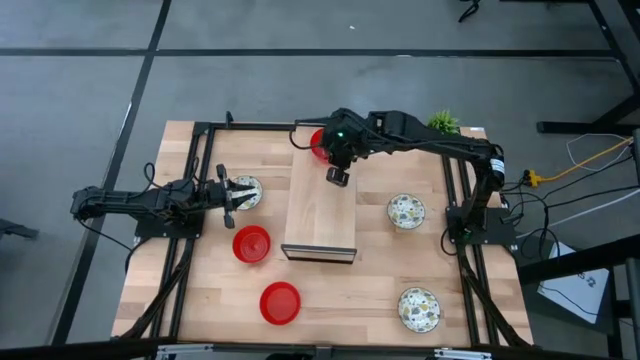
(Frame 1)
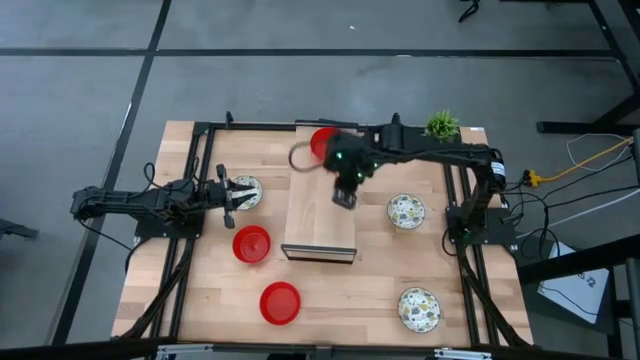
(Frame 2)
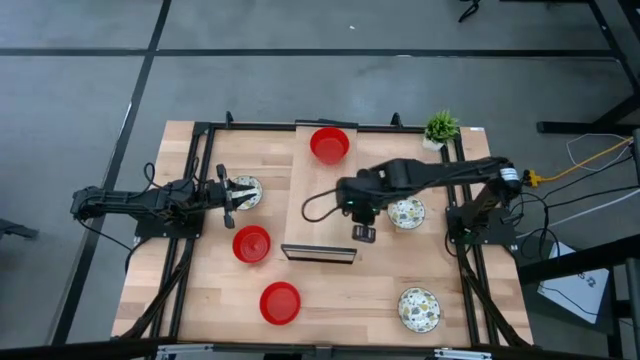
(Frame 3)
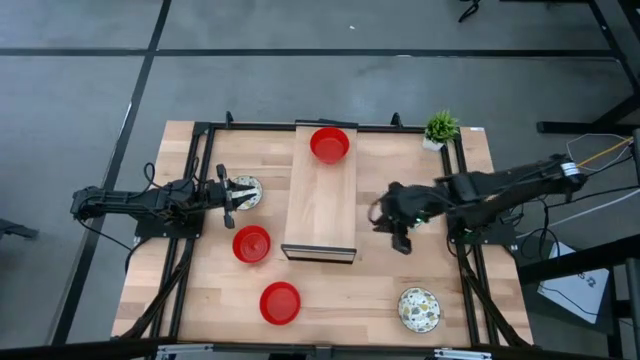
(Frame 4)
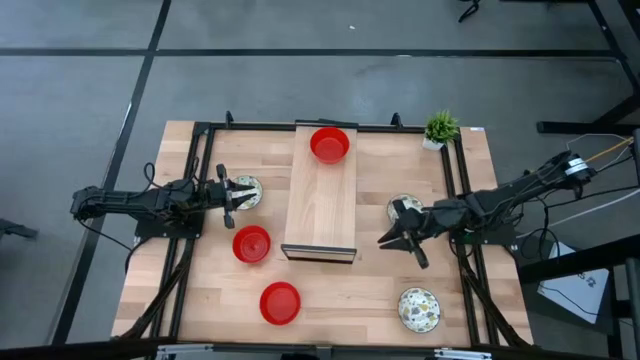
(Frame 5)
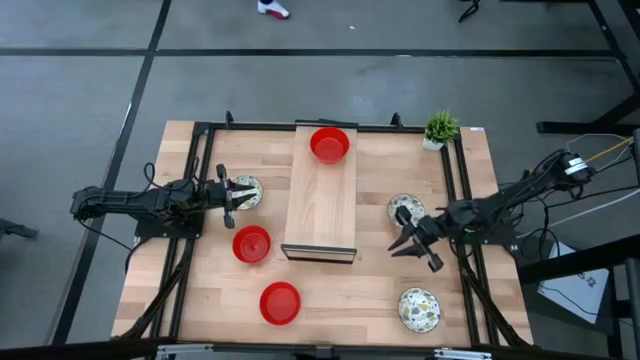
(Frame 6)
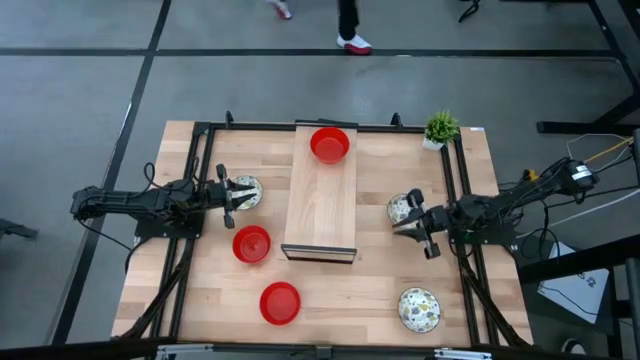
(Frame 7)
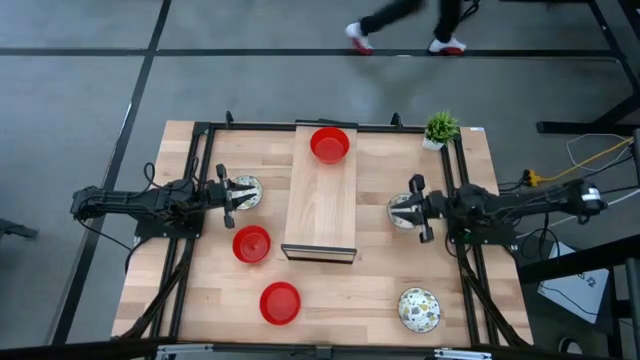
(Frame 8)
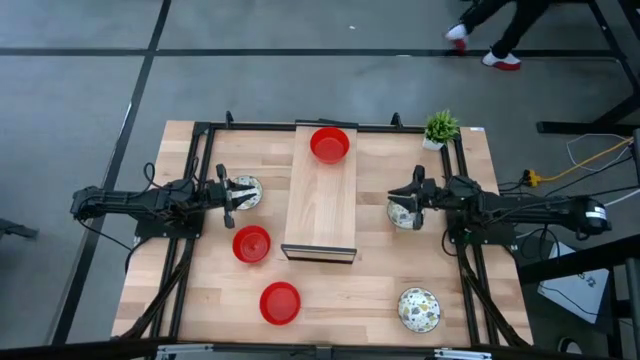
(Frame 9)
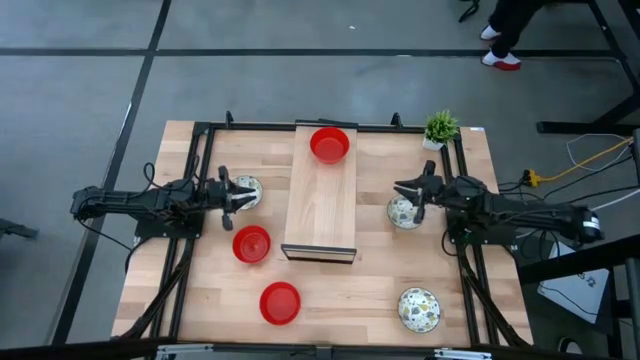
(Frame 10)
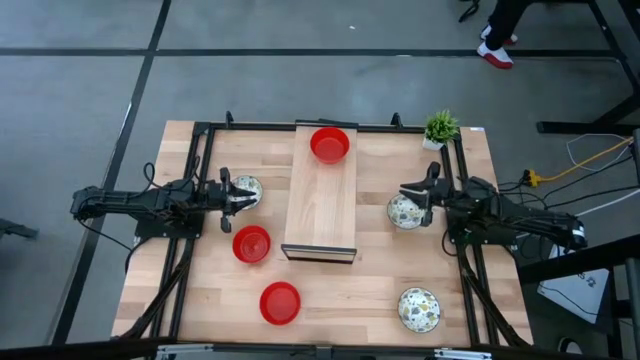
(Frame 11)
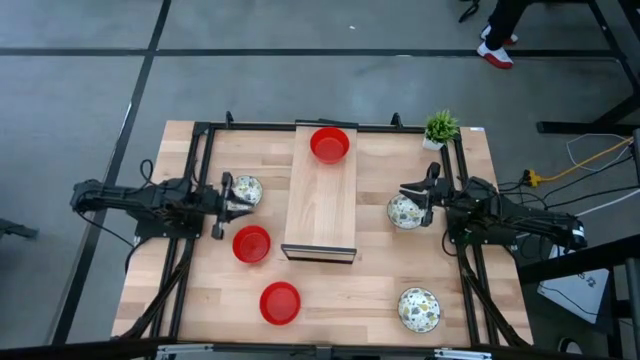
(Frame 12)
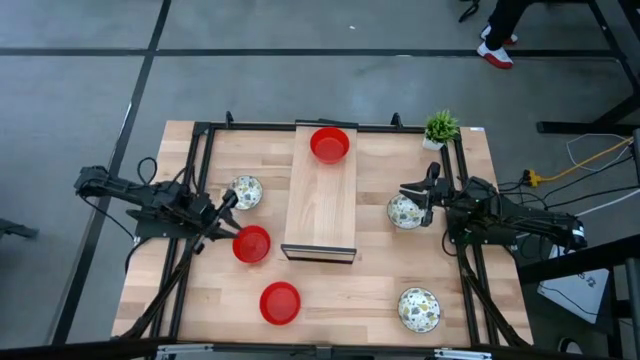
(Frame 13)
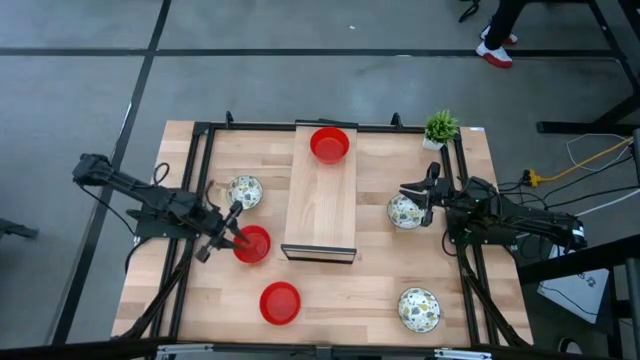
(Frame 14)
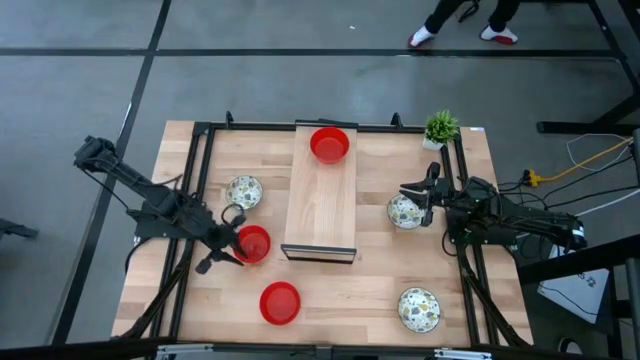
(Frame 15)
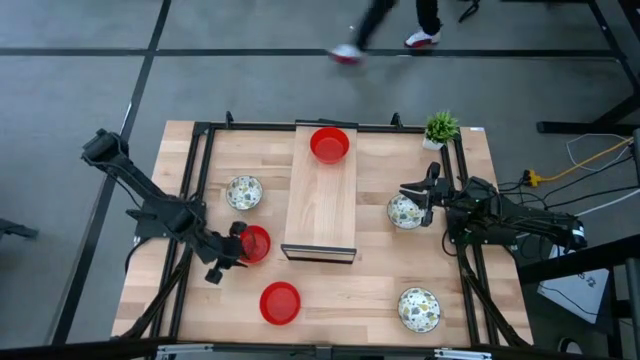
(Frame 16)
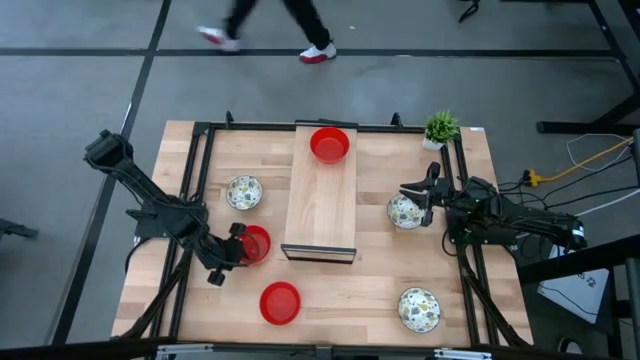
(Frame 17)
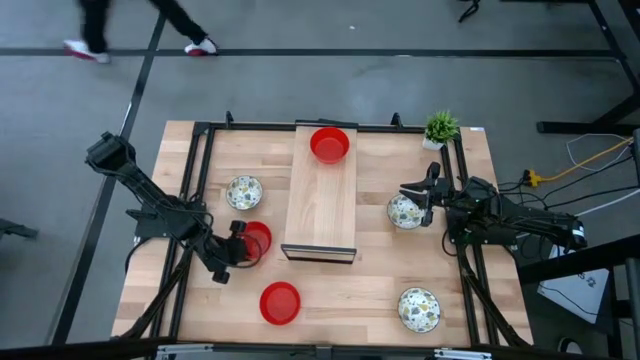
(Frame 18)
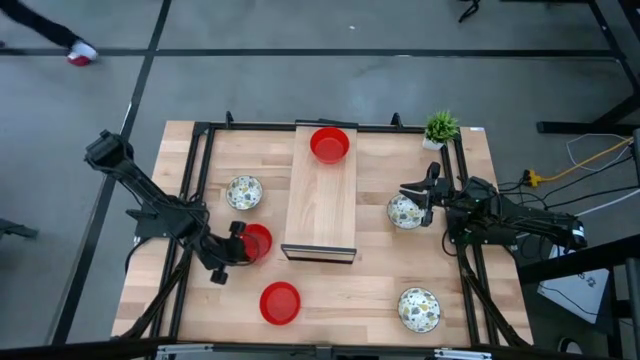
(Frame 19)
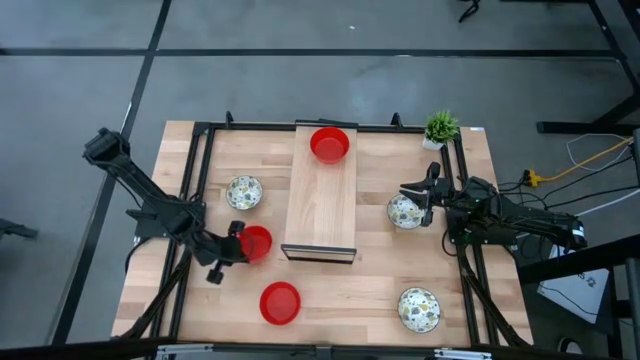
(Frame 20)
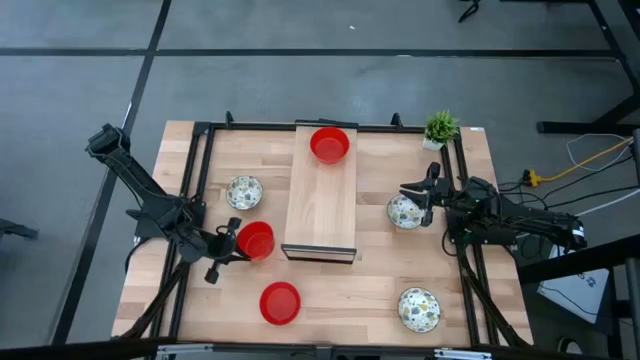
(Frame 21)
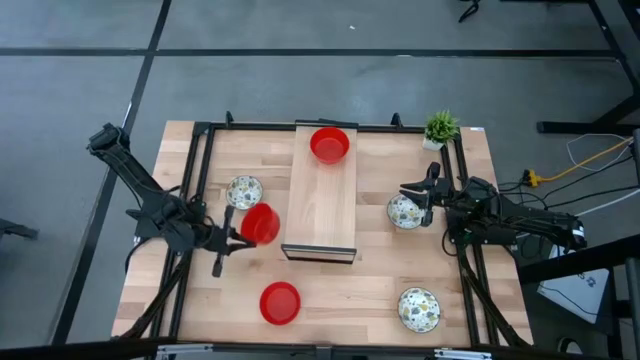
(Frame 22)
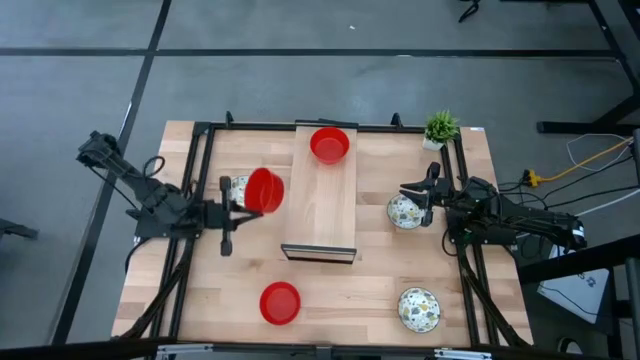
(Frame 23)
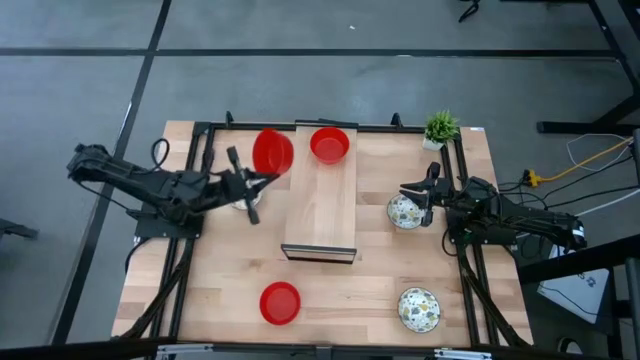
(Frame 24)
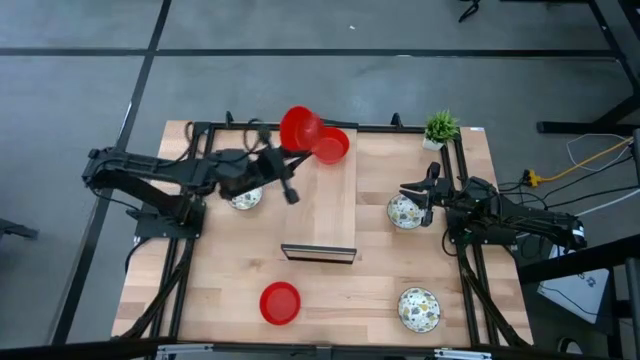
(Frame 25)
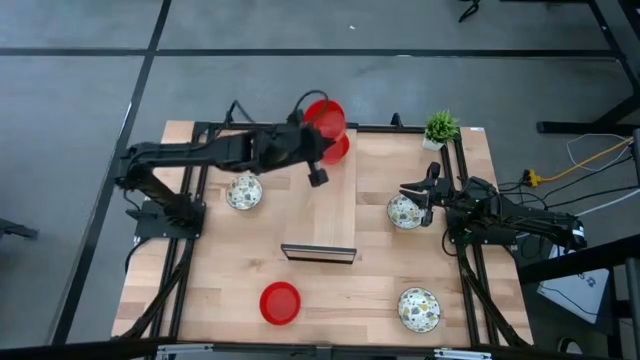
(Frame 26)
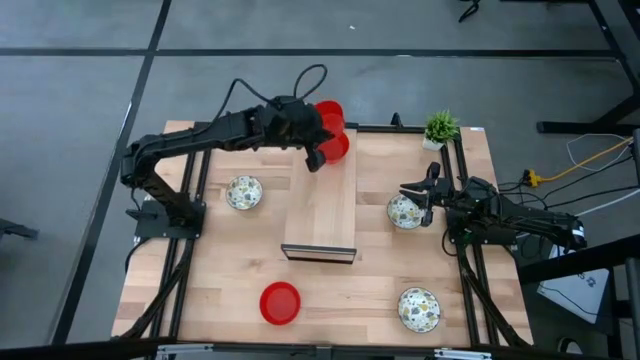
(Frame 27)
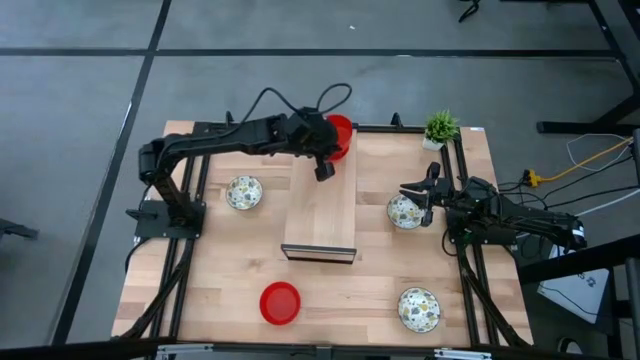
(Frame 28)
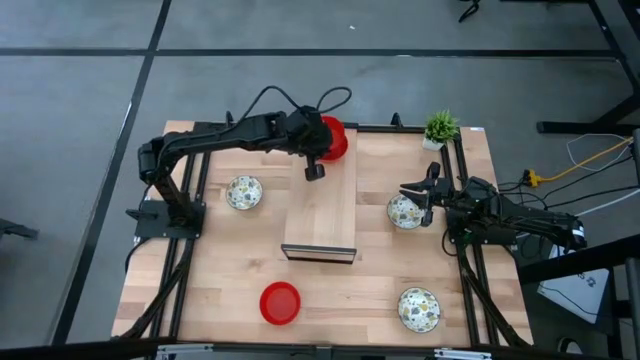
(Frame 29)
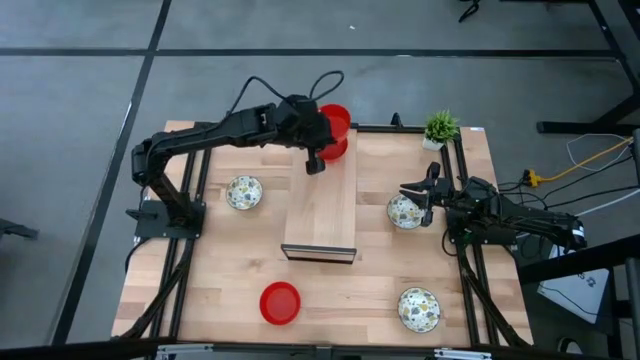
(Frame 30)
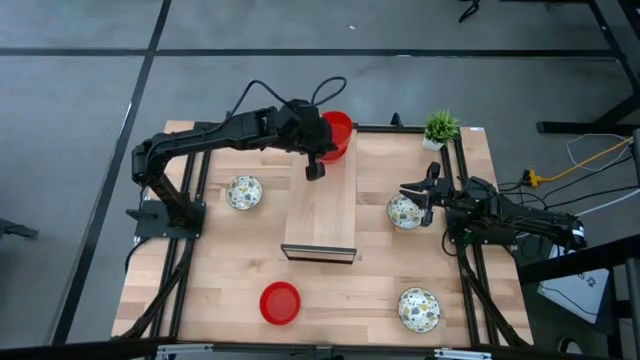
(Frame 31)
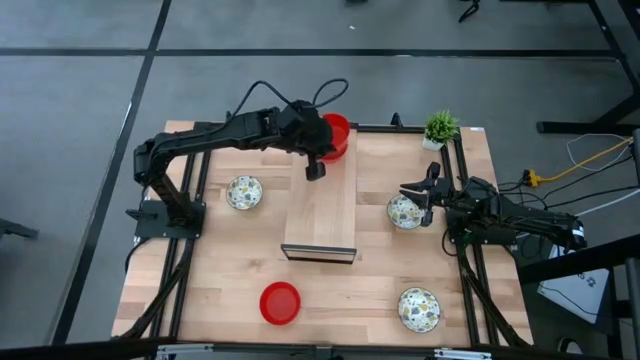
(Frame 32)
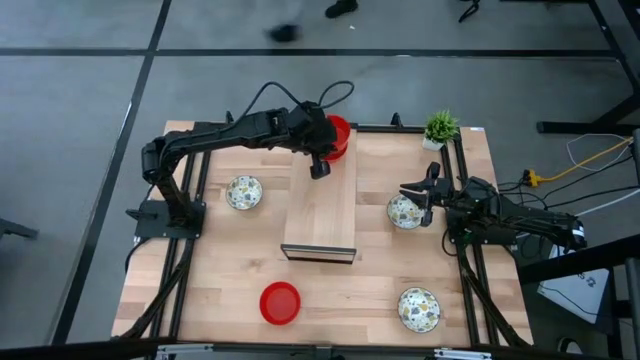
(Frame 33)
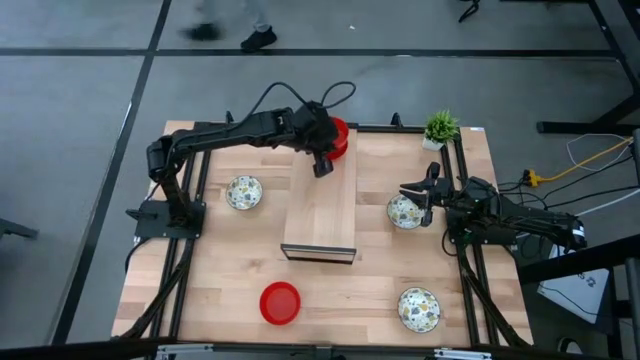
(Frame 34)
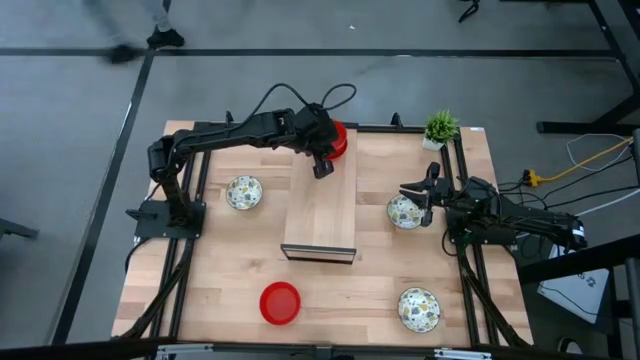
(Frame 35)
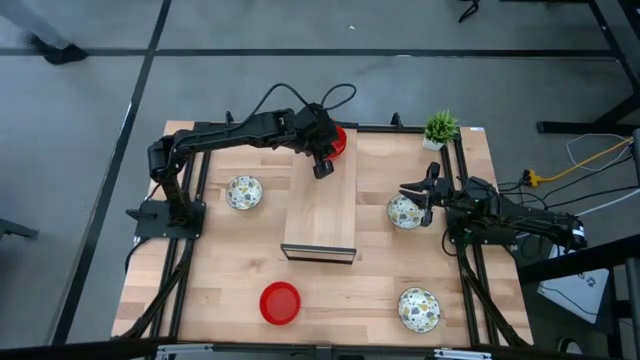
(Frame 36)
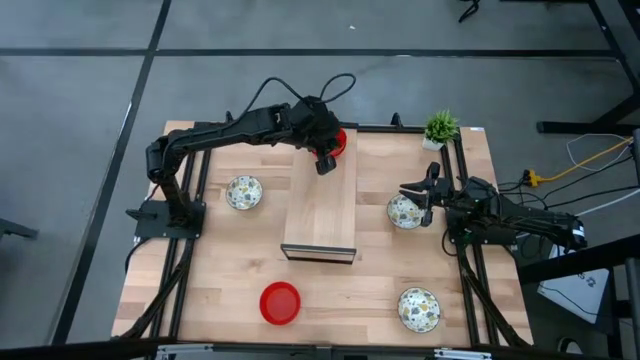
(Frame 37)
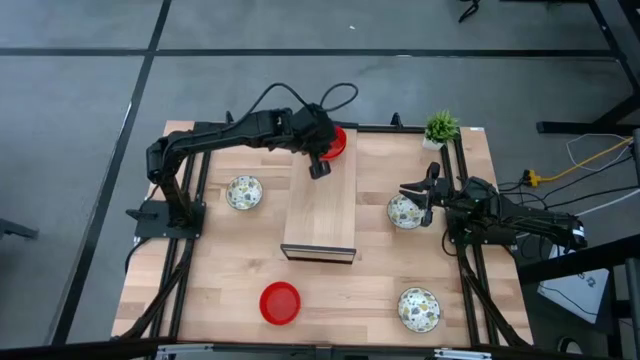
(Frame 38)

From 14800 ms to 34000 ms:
Task: Pick & Place Mini bowls
Stack the top red bowl on top of the red bowl on the shelf
